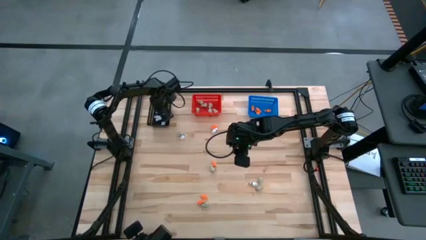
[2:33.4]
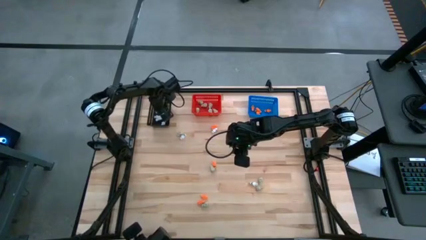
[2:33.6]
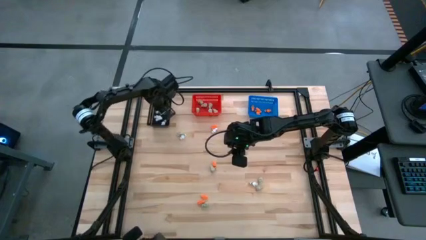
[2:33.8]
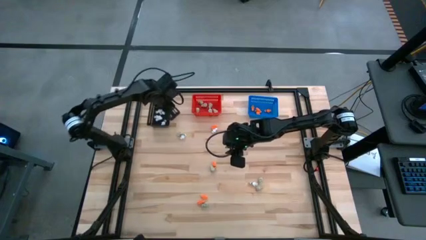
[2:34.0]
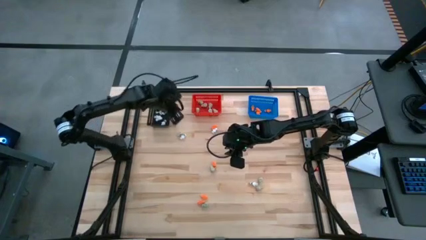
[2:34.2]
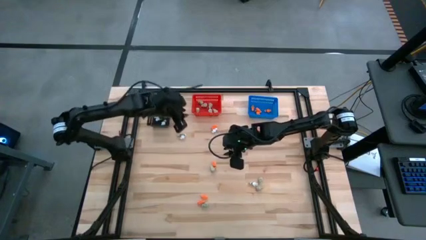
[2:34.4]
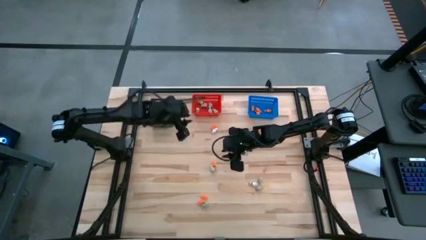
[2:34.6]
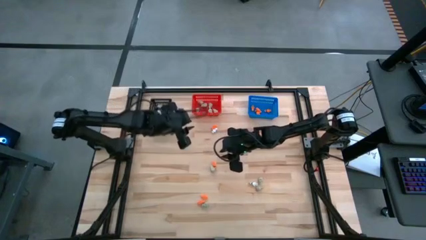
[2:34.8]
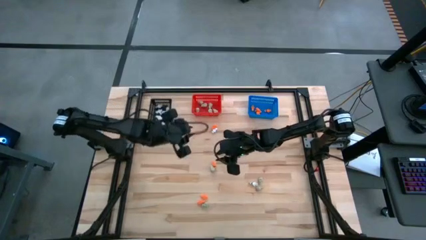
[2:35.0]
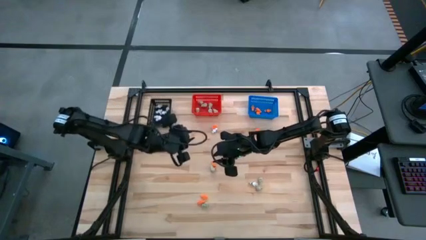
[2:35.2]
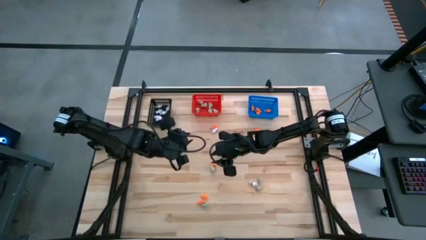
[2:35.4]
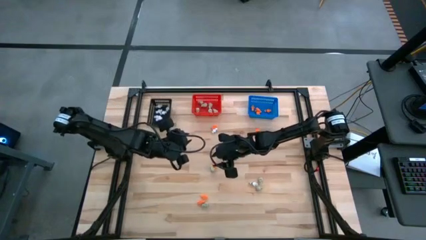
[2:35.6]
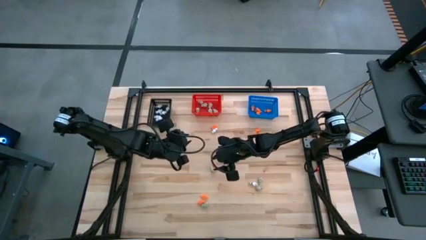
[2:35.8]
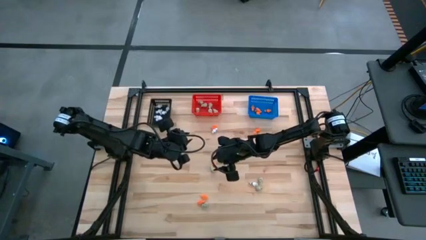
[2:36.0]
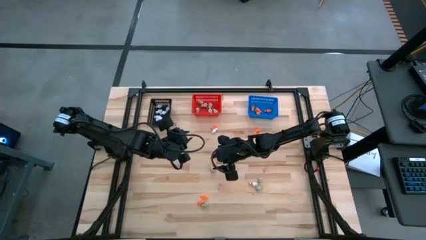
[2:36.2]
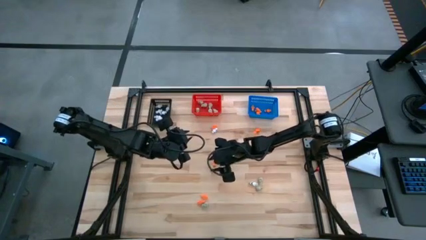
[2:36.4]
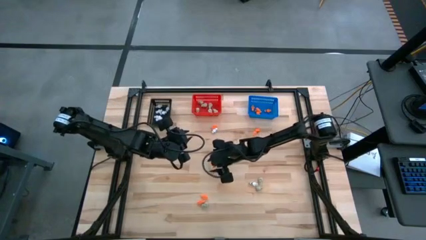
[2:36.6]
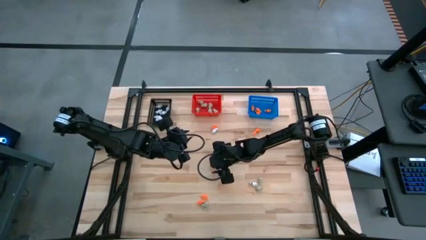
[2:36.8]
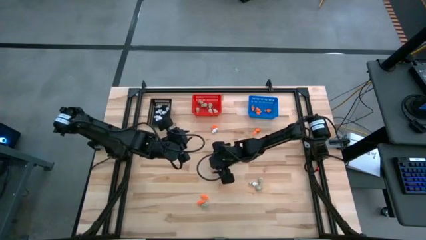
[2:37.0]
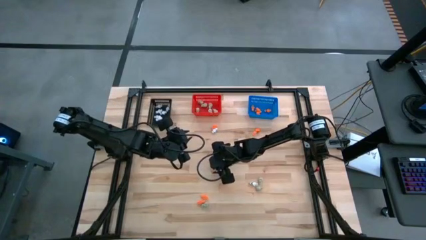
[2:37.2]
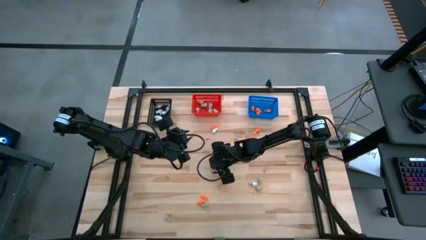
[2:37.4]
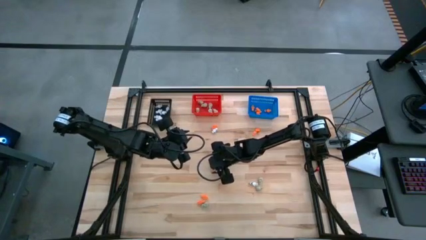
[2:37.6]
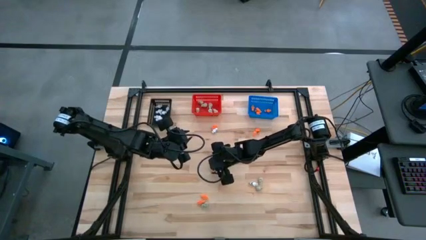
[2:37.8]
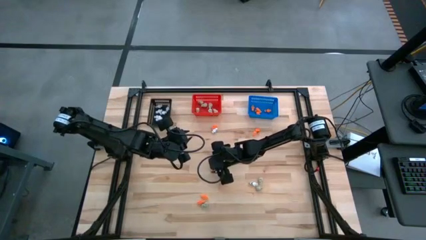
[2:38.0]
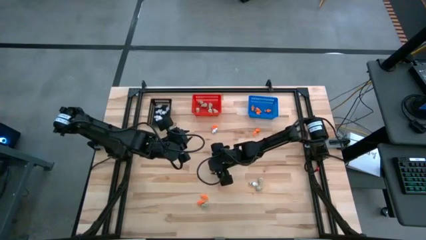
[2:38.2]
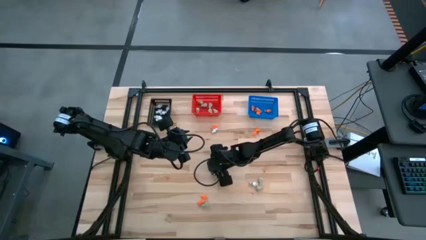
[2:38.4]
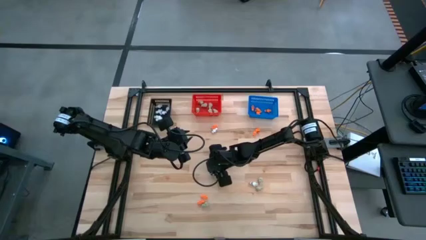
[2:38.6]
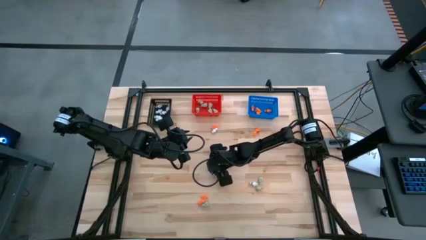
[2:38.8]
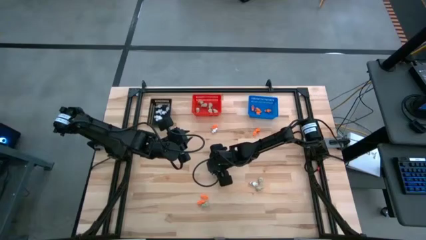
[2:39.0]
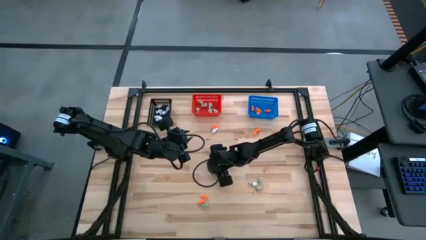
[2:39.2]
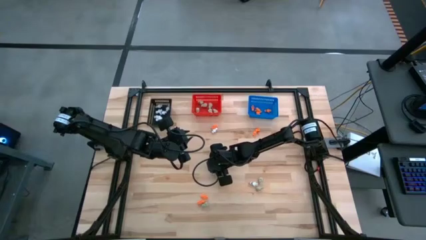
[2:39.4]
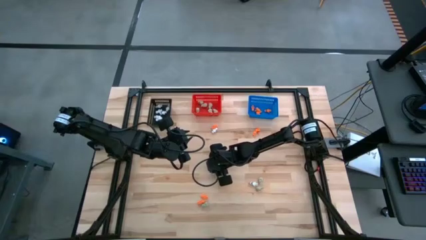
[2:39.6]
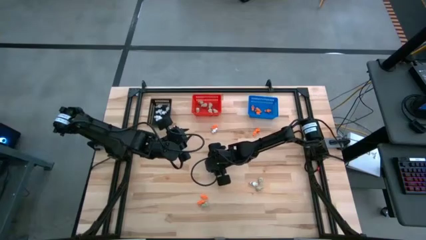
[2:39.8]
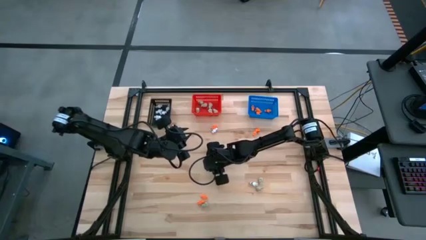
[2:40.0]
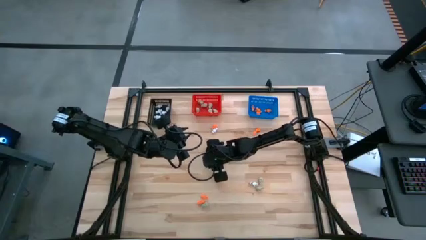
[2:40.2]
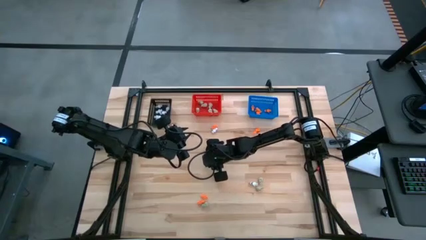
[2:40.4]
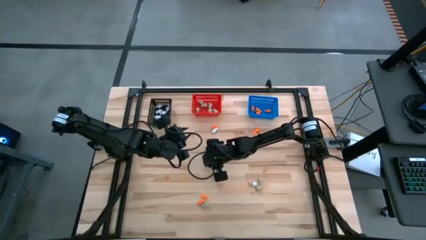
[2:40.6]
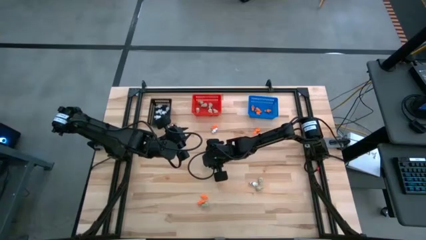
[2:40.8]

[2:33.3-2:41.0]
Task: Sort Halloween decoration
Put the white skull toy into the red bin

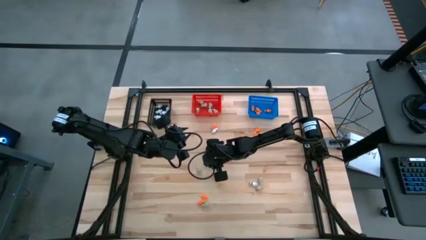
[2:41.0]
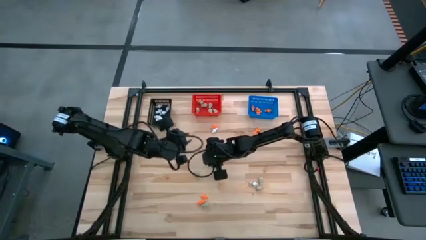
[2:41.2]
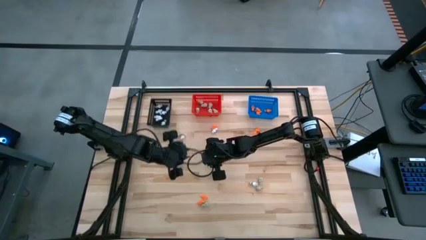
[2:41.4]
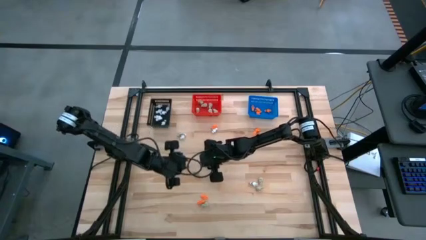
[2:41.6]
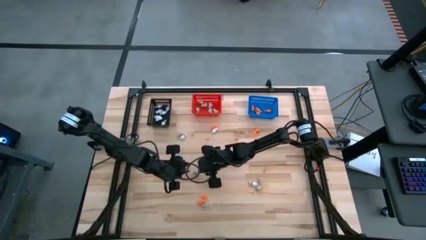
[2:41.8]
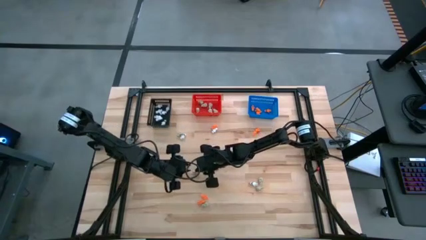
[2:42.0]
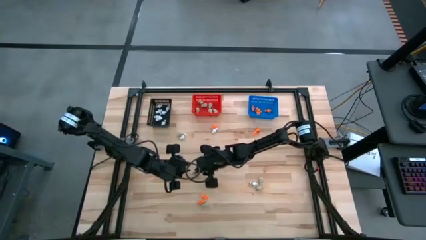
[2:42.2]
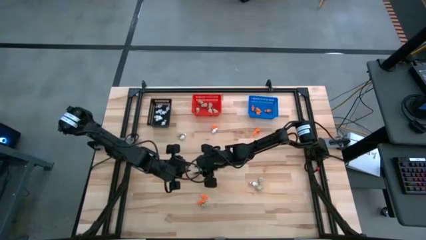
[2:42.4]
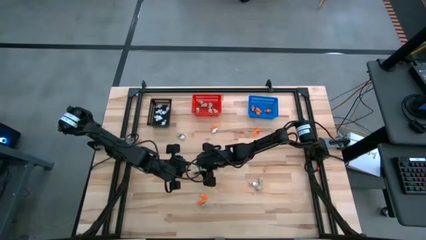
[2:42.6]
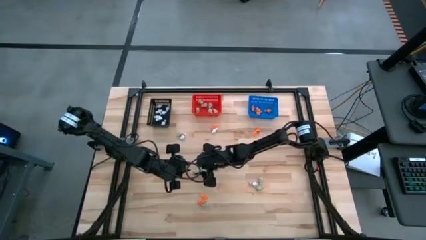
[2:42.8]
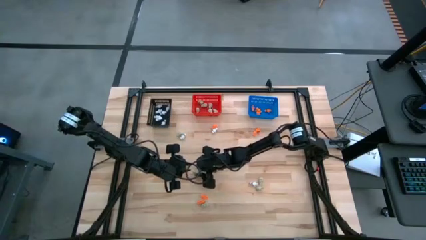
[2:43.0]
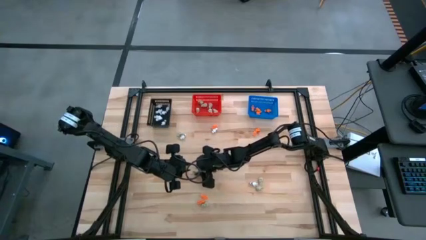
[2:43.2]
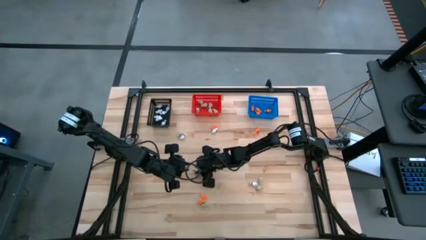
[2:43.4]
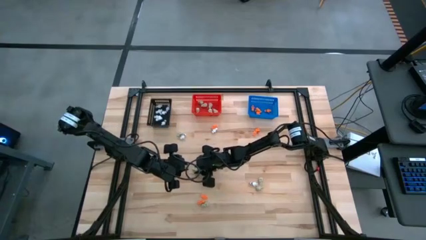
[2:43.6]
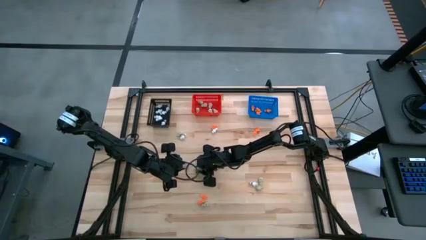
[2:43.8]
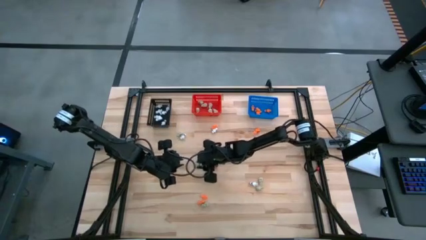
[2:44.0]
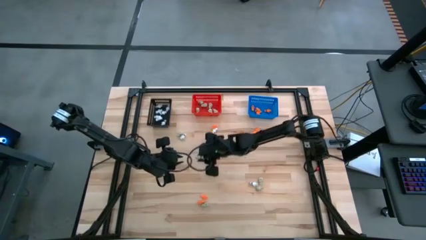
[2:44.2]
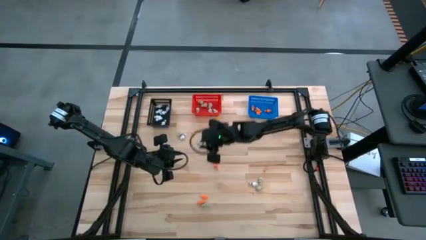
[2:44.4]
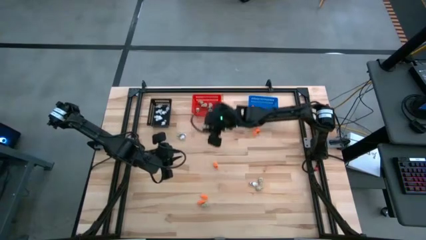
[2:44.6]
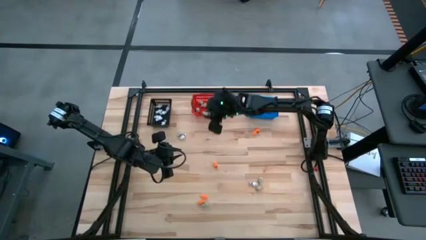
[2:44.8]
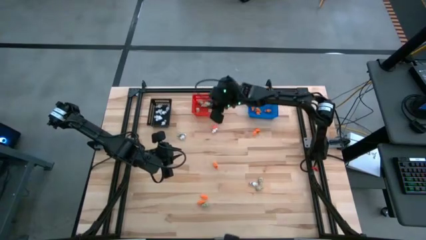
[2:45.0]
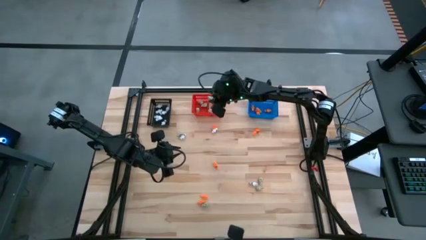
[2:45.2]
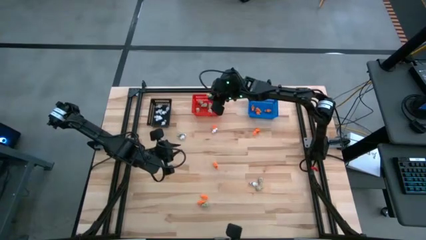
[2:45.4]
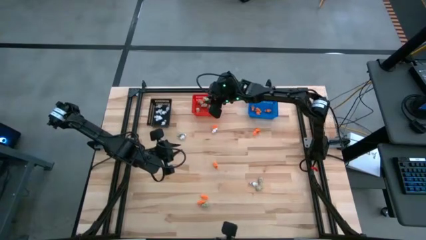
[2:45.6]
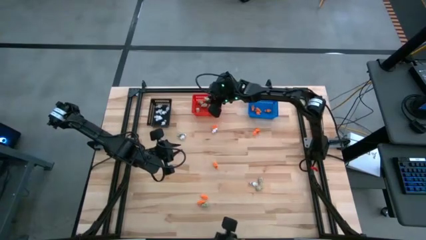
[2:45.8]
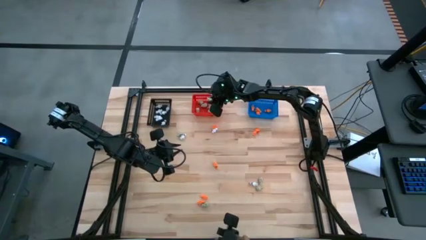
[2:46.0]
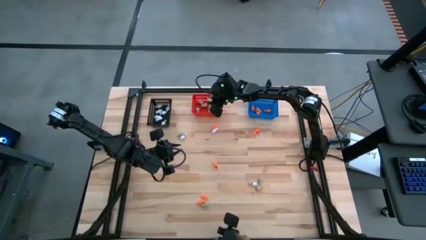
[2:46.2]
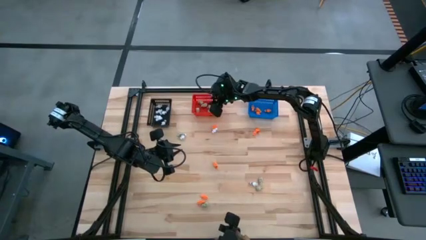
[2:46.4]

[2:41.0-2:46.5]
Put the white skull toy into the red bin

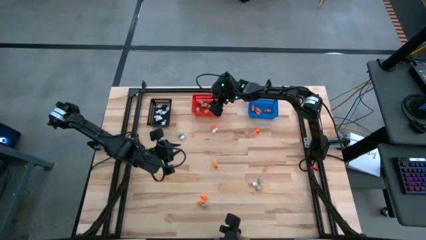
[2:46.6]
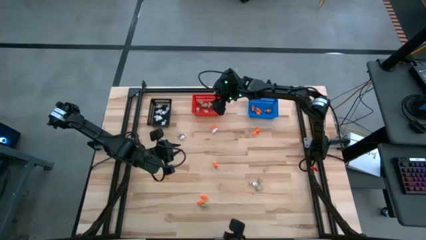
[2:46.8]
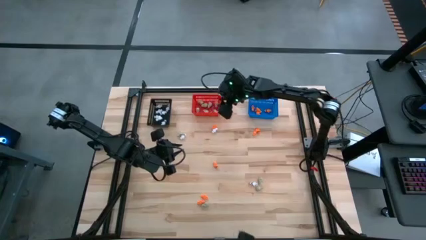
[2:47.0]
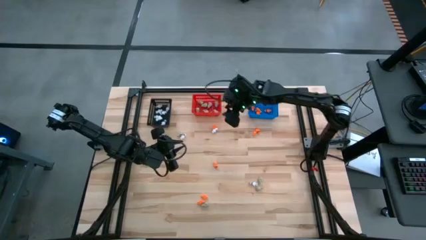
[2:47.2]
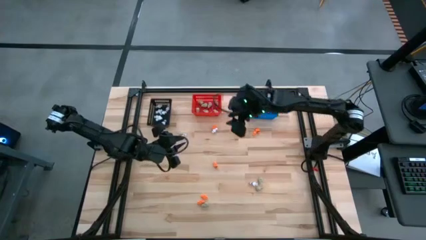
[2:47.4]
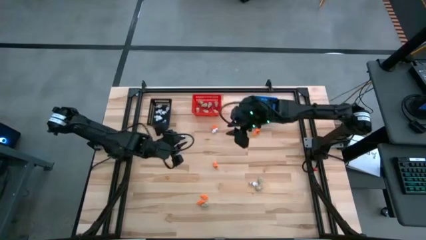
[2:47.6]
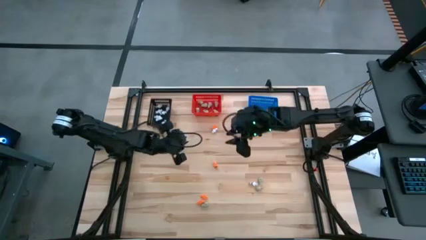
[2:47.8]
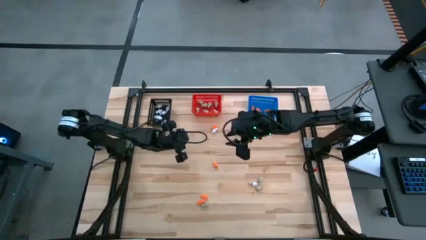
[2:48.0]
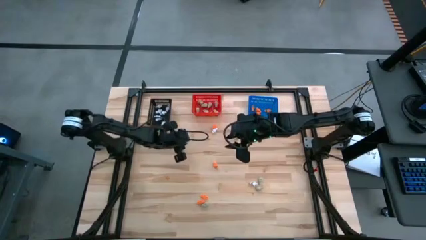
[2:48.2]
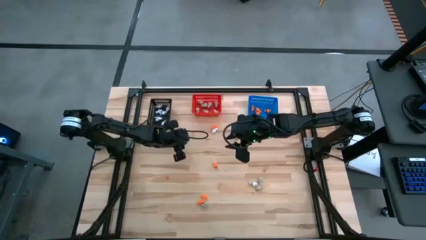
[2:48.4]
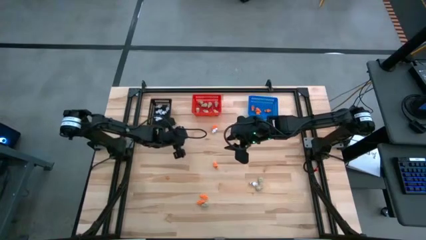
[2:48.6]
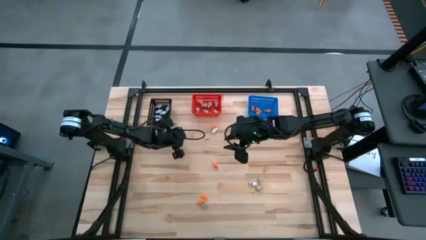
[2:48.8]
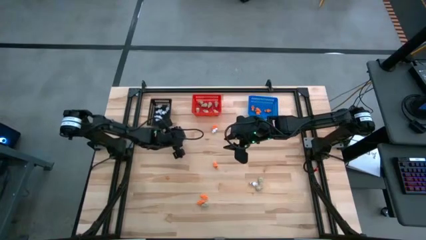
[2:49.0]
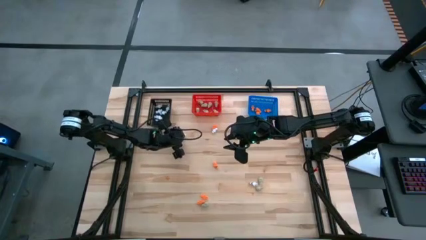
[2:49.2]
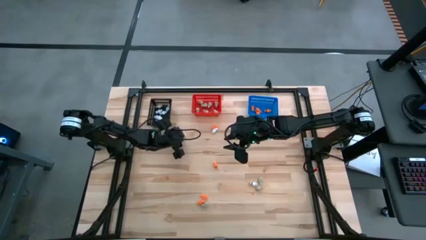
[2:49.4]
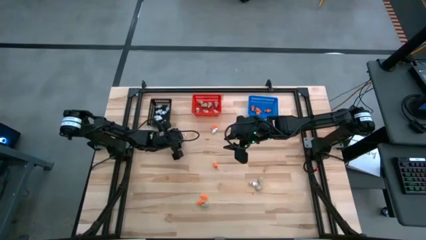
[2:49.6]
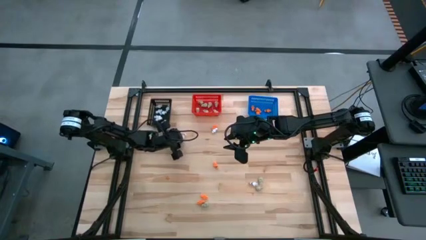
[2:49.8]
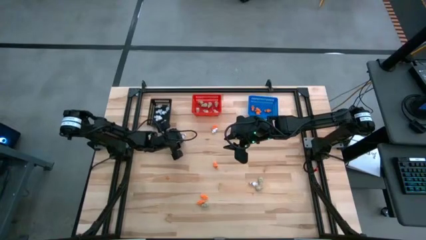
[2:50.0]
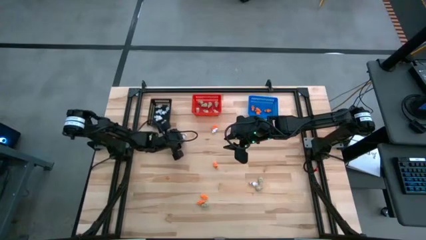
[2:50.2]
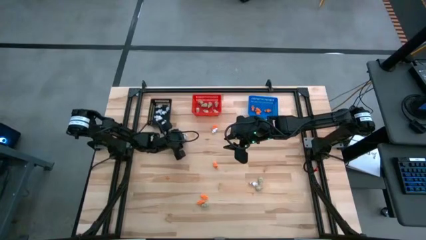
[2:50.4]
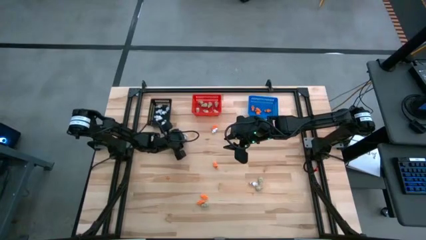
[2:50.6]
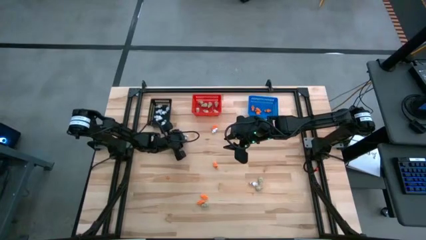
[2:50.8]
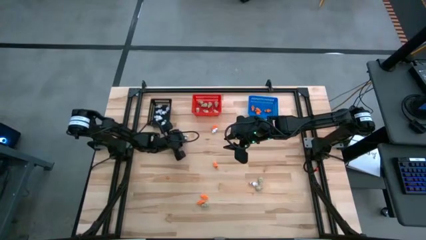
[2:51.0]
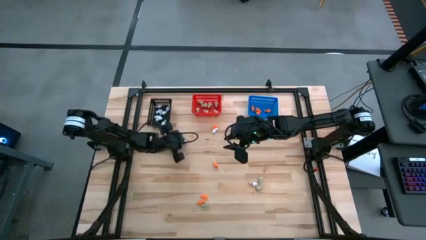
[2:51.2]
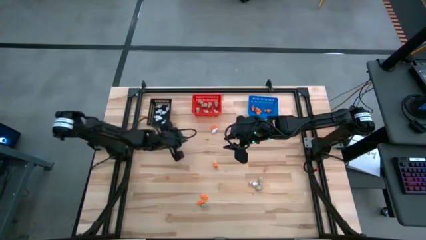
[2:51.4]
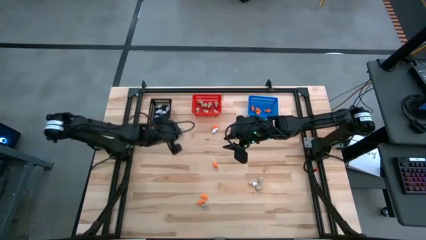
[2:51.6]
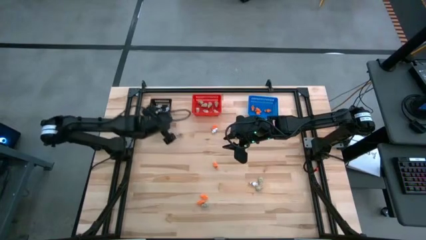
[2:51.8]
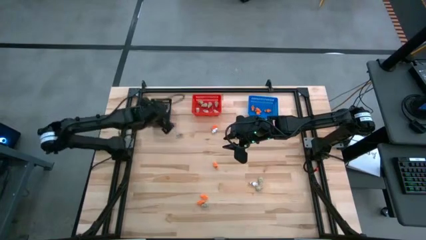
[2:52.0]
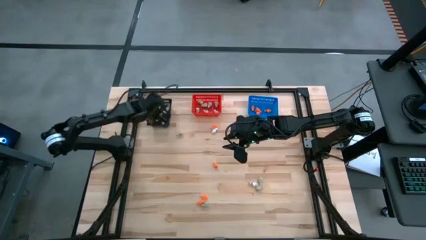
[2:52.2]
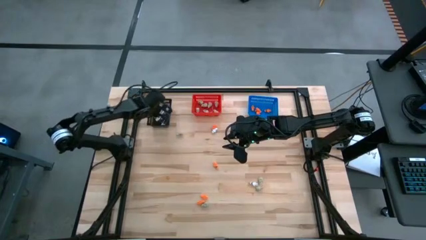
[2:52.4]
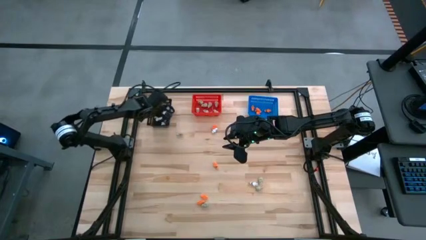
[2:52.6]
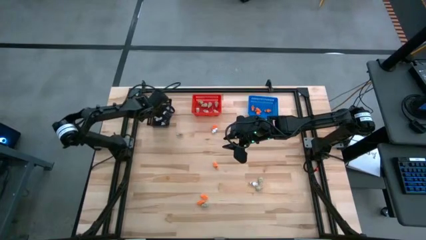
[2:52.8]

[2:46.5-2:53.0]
Put the white skeleton toy into the black bin
